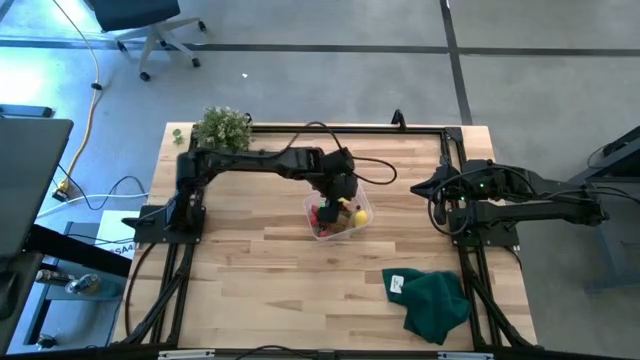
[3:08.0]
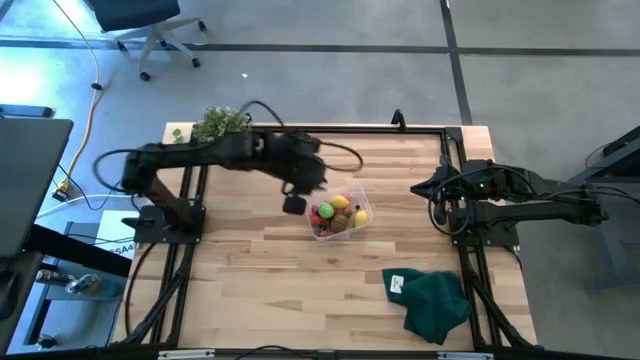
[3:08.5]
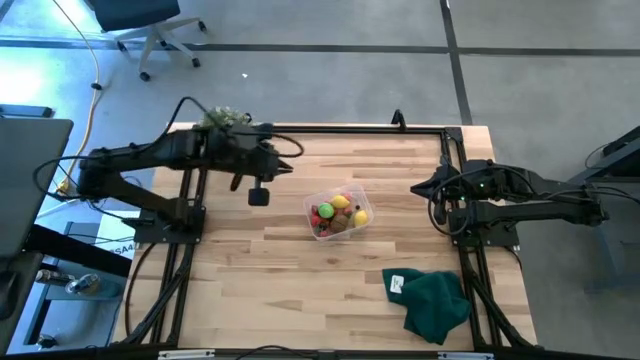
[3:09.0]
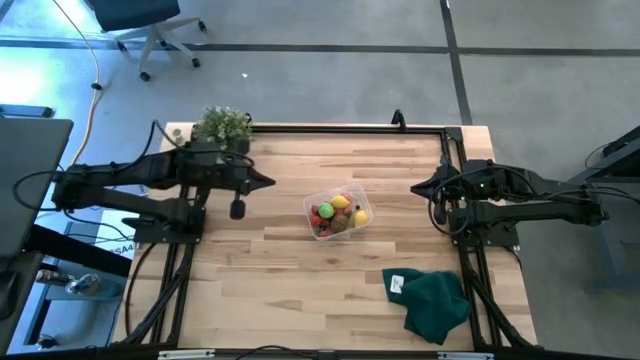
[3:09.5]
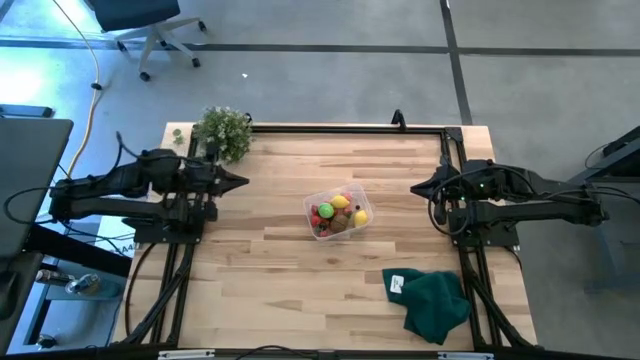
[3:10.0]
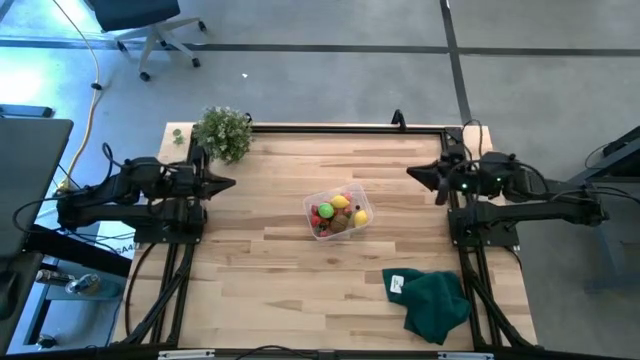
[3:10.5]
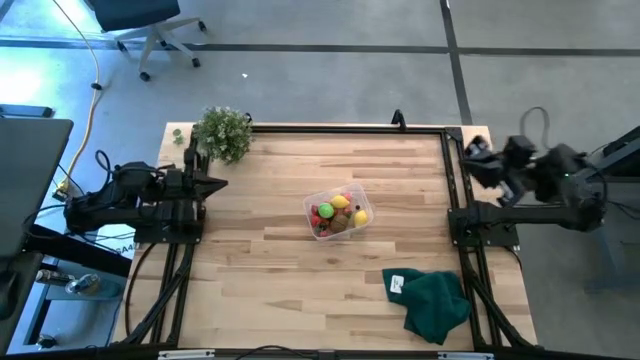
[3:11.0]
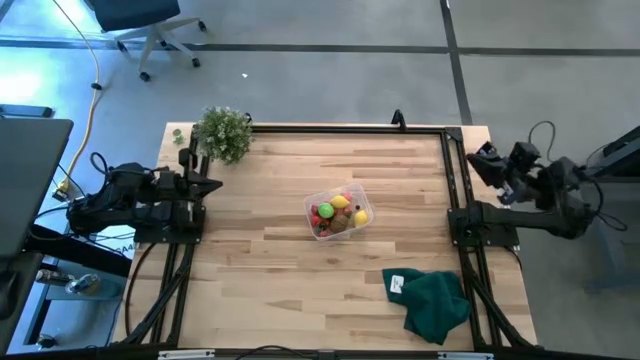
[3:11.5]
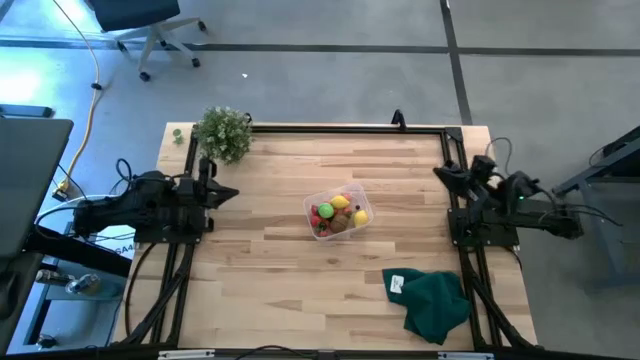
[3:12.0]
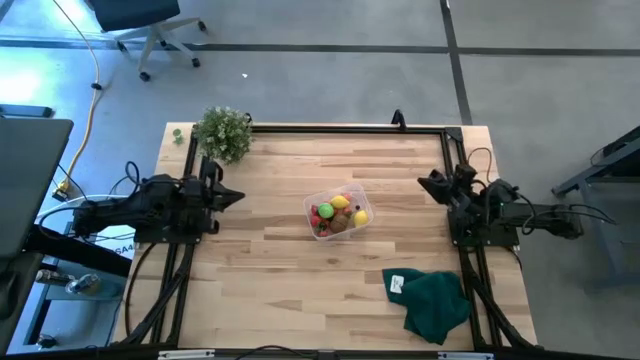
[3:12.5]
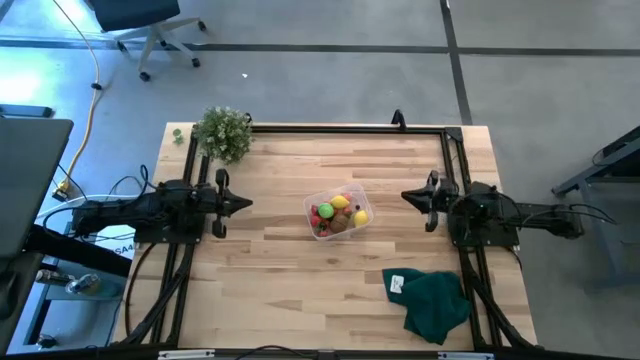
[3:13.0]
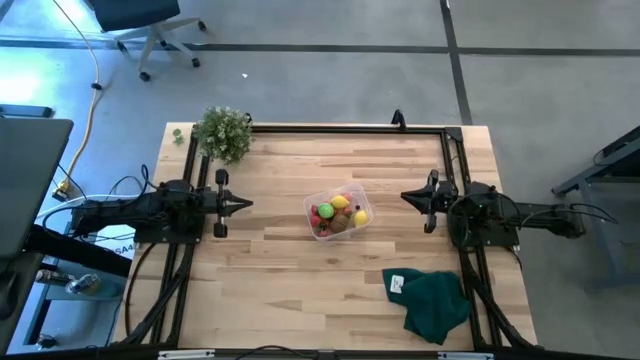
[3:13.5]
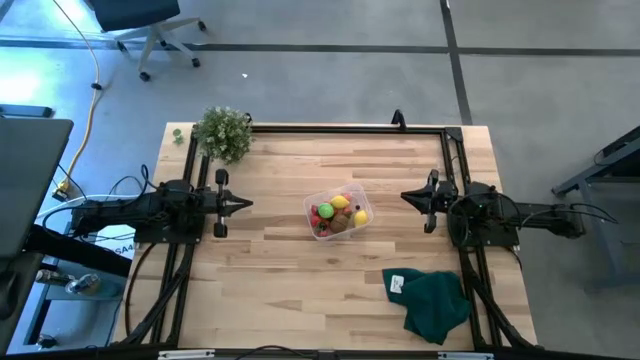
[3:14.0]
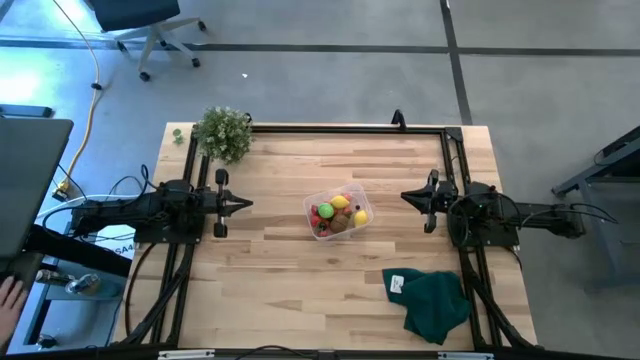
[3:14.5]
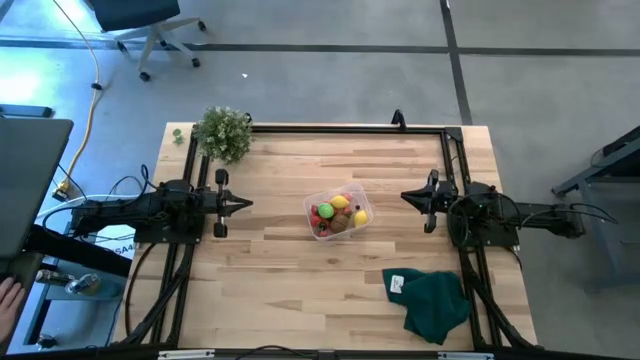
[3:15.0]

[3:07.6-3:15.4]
Task: Pick and placing Produce into tupperware
Return to Home Position

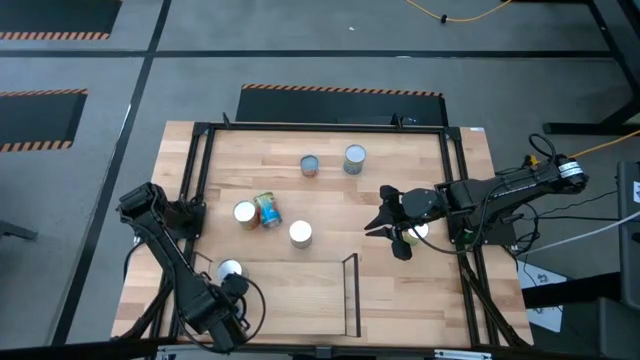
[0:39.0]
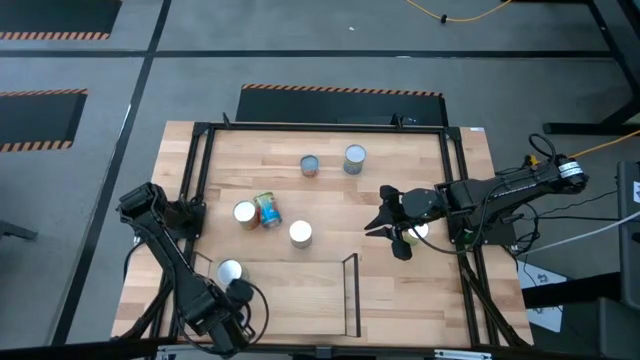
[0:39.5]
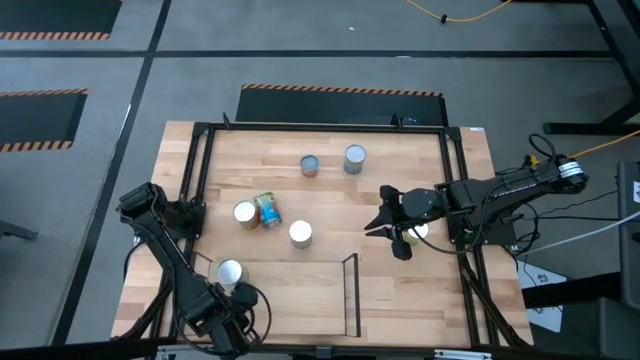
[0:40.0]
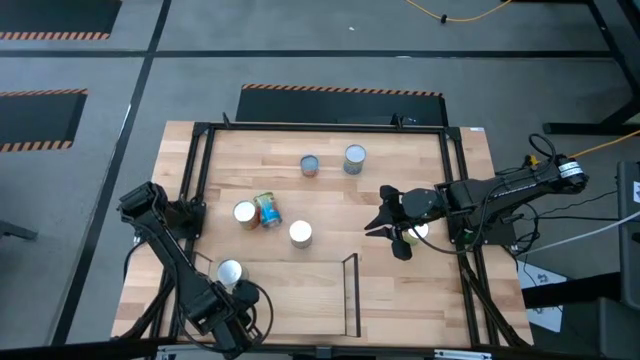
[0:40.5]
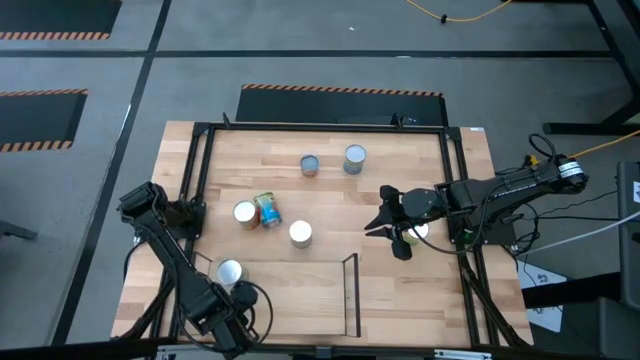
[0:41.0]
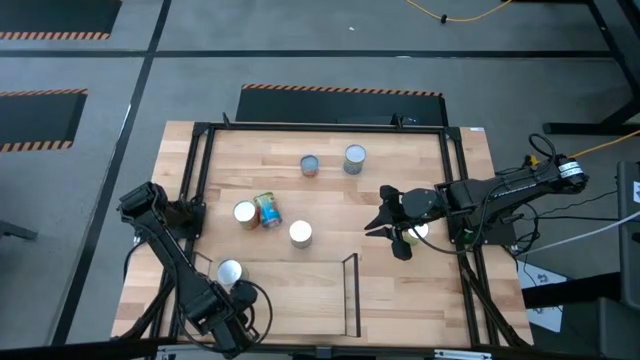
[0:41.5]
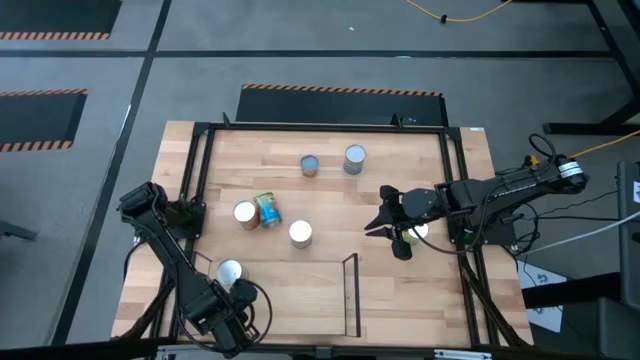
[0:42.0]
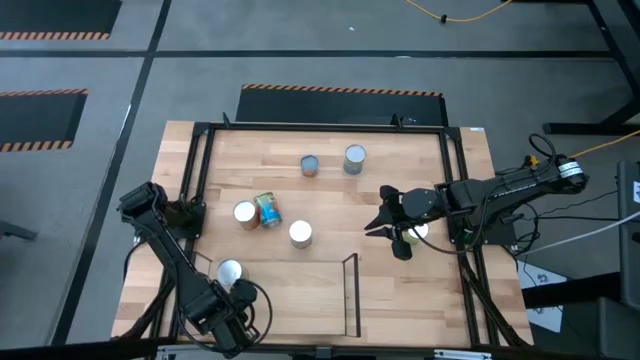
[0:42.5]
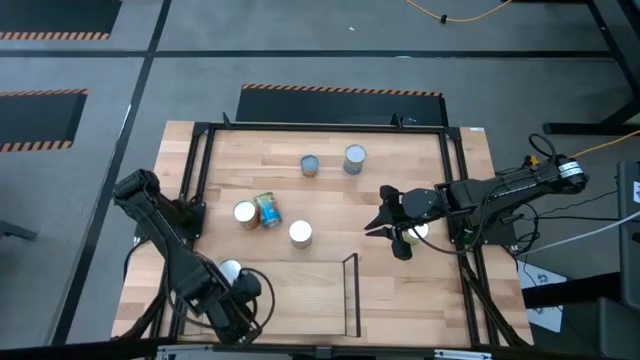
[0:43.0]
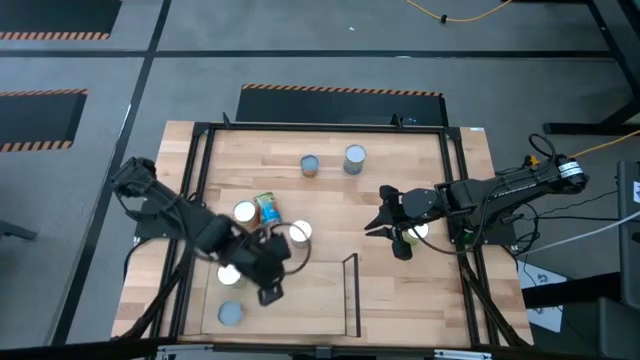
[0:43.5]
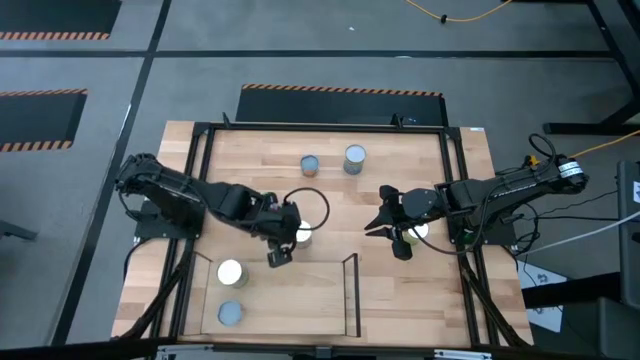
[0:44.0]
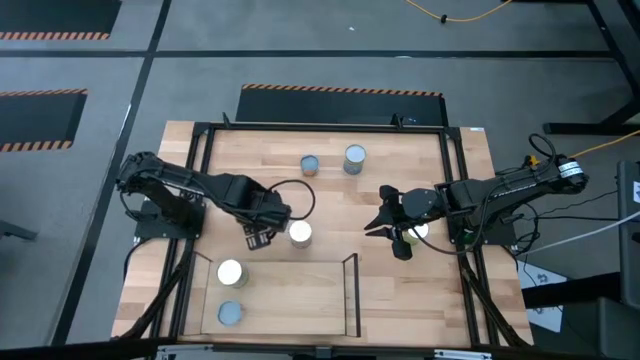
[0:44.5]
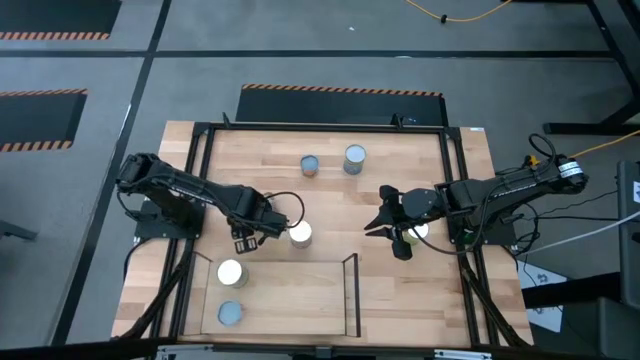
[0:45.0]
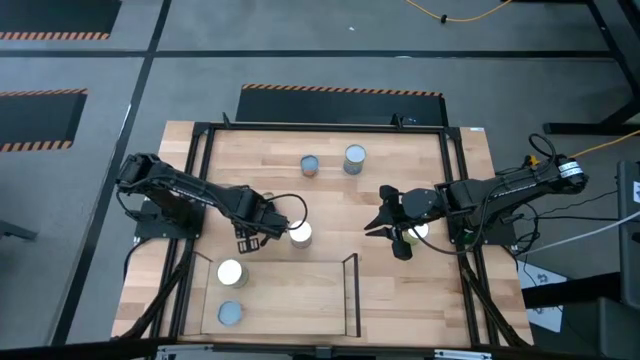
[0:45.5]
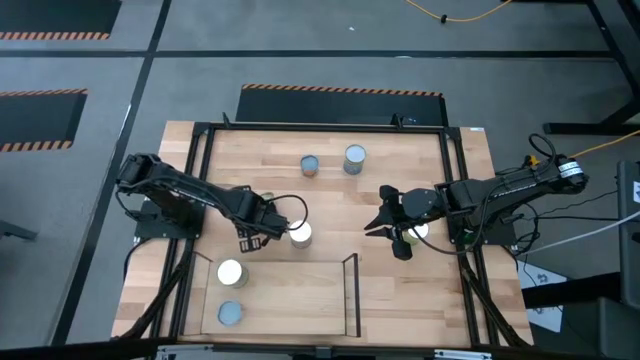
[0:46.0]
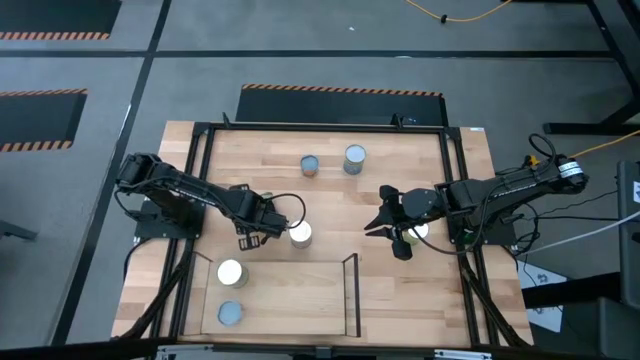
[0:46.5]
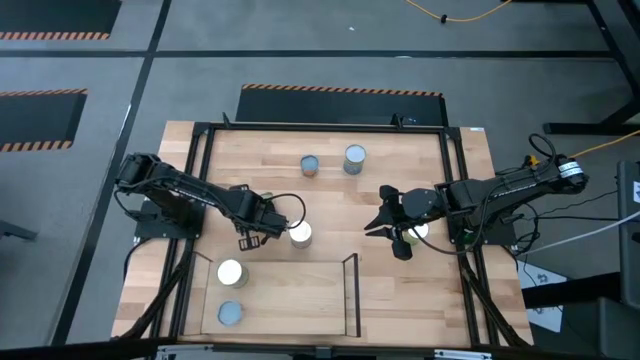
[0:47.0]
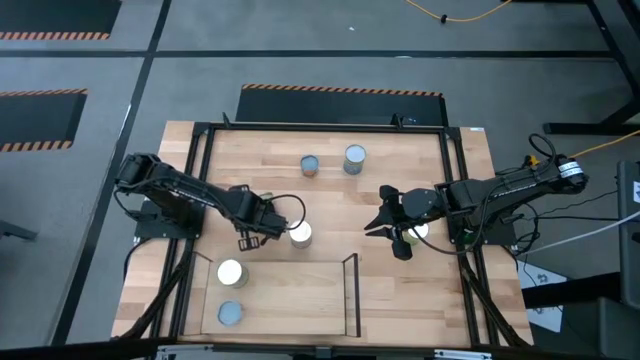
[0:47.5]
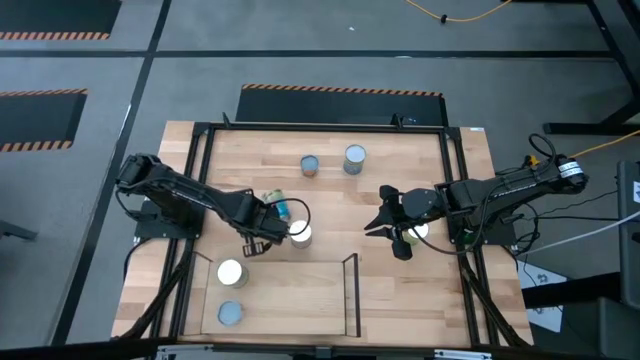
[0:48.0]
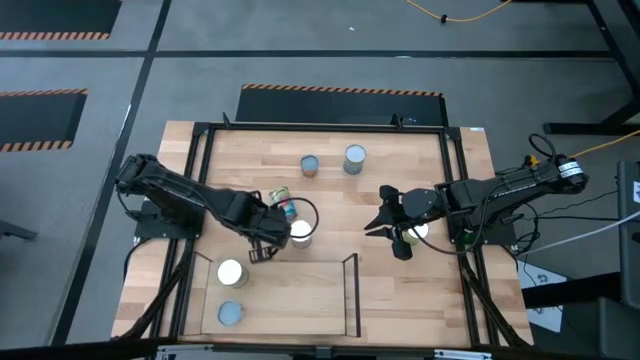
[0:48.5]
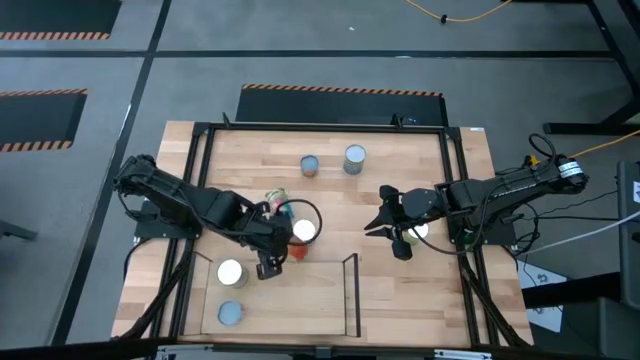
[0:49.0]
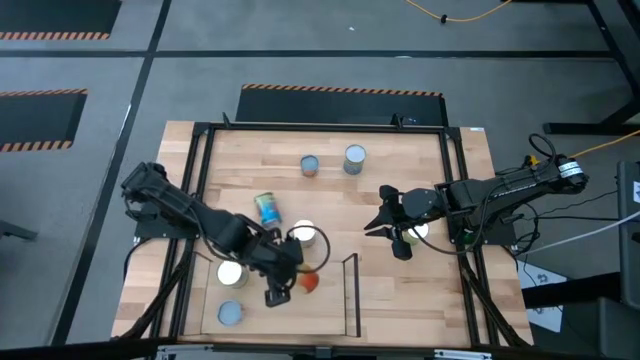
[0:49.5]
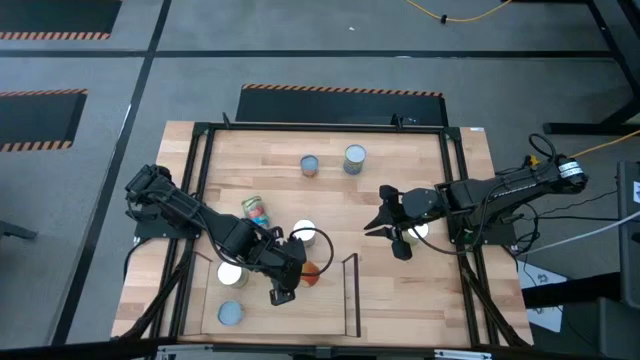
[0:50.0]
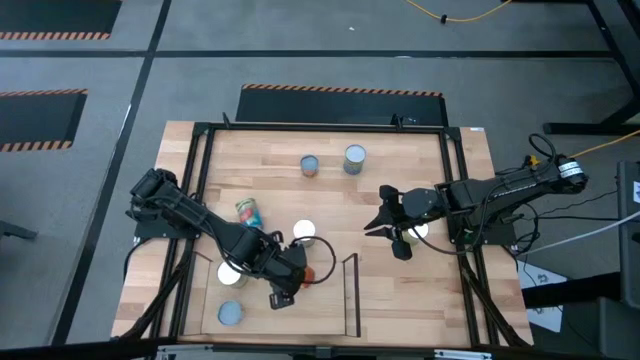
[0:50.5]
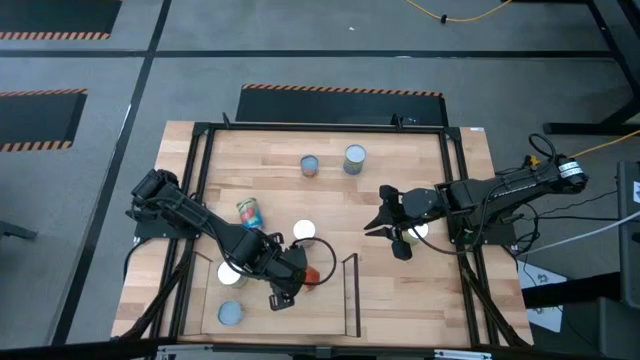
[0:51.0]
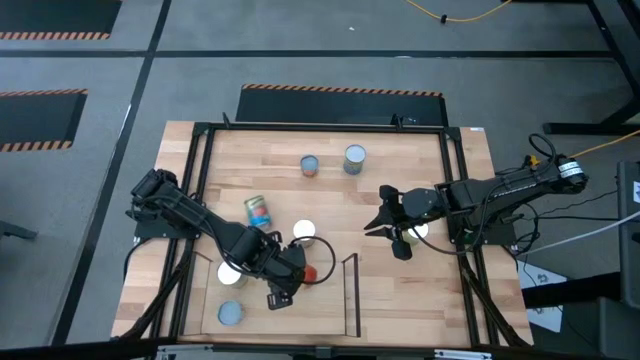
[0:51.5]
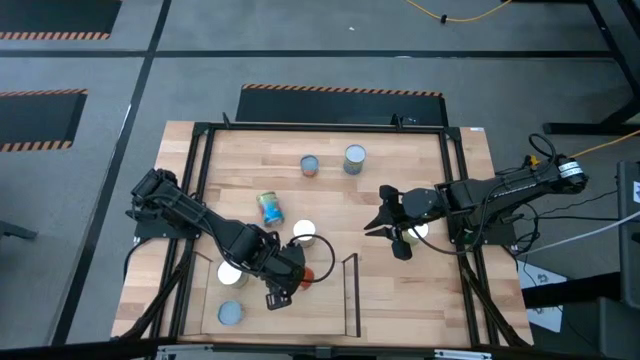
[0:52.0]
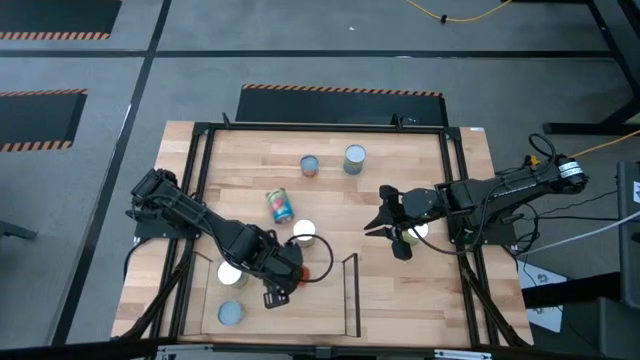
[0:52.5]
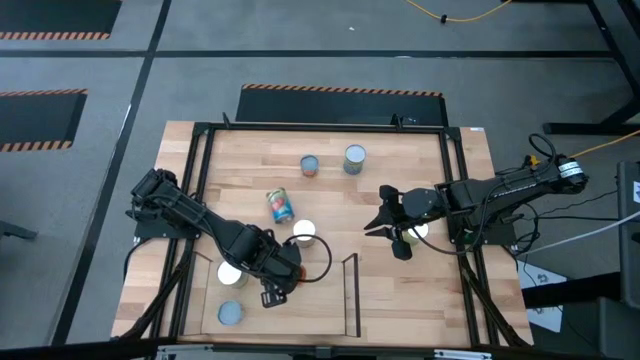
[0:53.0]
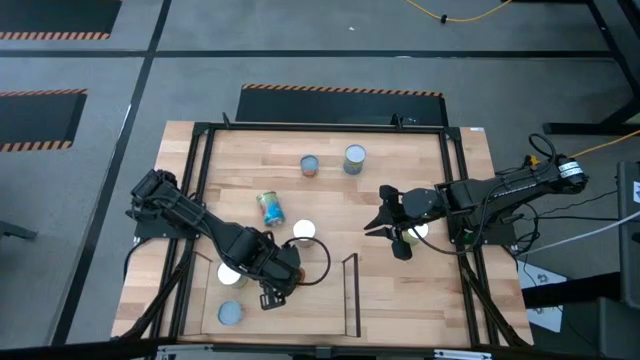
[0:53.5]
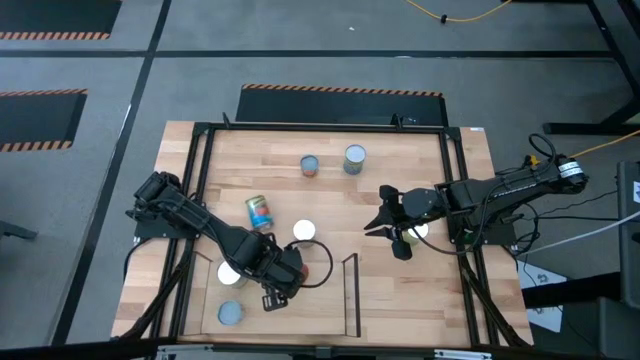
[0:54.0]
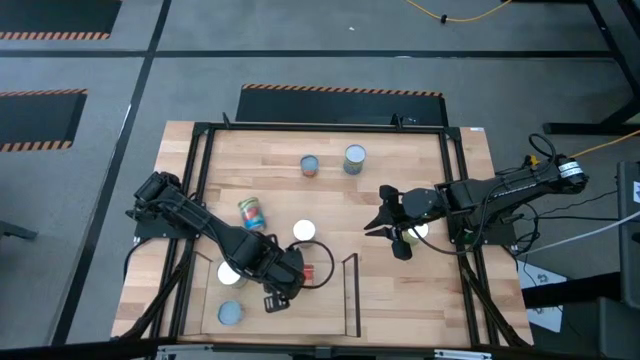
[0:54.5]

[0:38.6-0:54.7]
Task: Pick and place cans onto a shelf
Put the canned pineapple on the shelf
